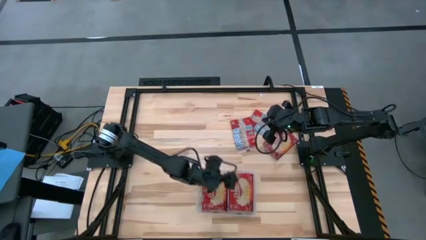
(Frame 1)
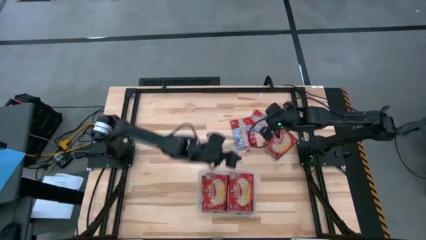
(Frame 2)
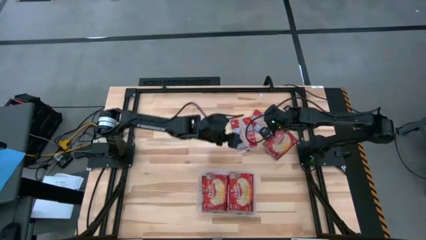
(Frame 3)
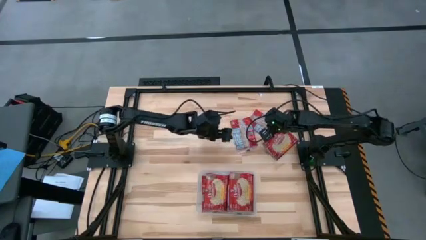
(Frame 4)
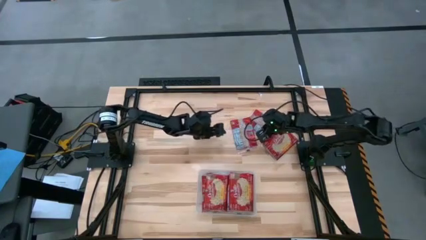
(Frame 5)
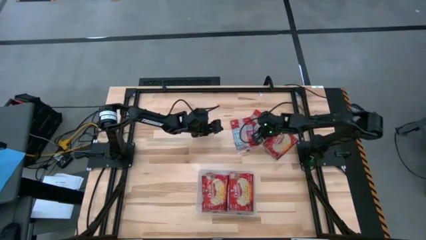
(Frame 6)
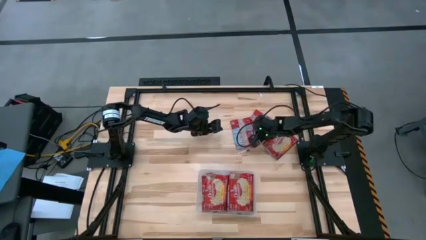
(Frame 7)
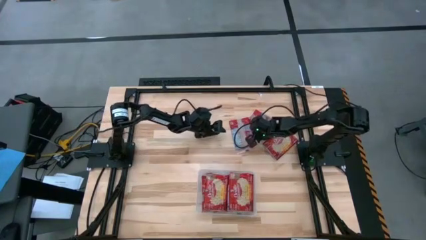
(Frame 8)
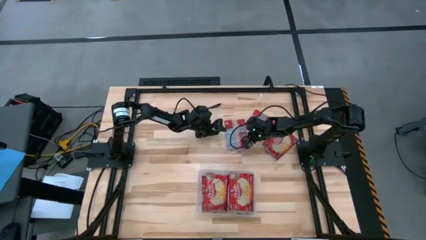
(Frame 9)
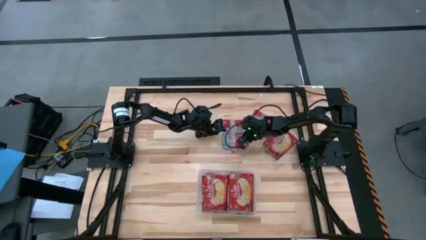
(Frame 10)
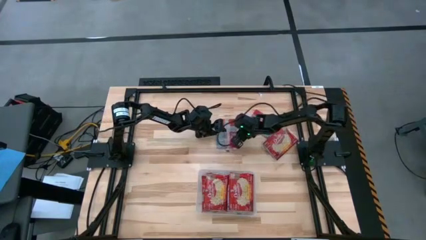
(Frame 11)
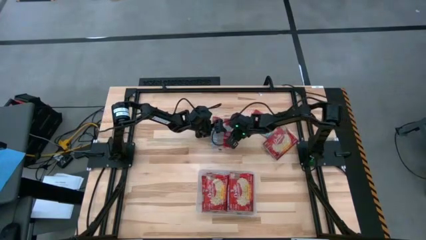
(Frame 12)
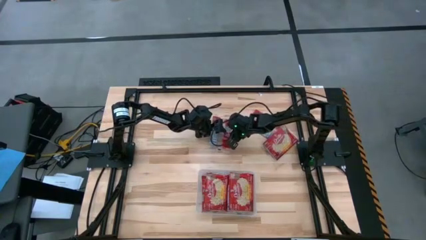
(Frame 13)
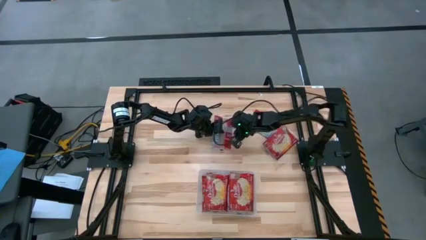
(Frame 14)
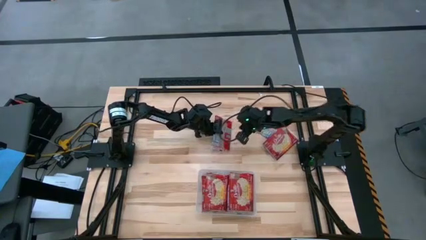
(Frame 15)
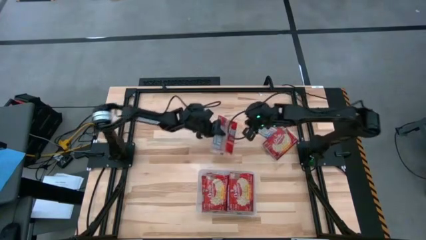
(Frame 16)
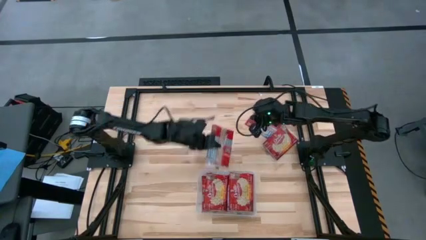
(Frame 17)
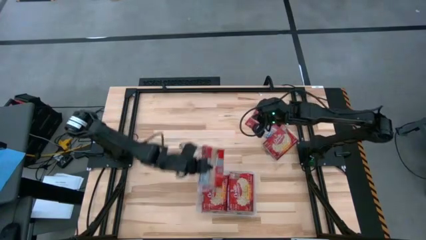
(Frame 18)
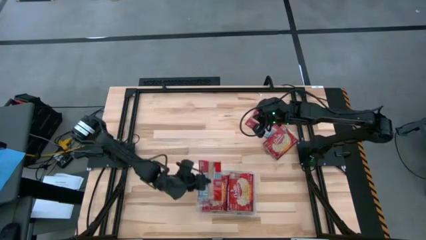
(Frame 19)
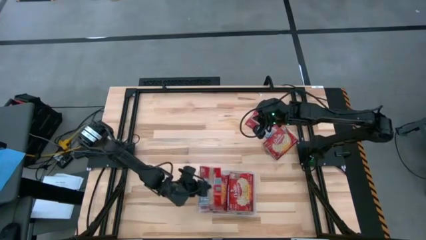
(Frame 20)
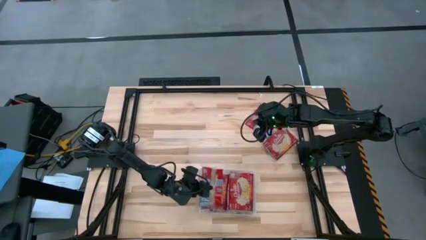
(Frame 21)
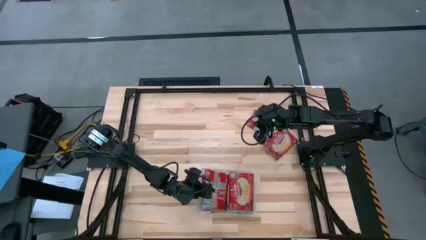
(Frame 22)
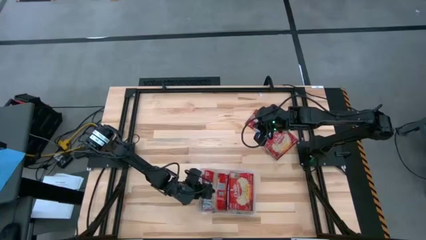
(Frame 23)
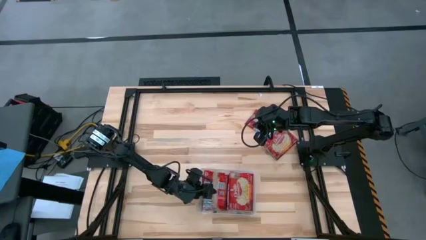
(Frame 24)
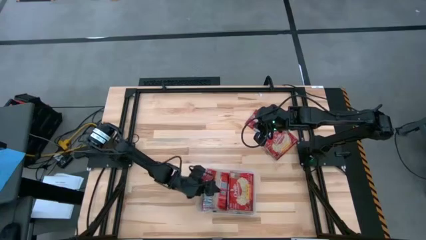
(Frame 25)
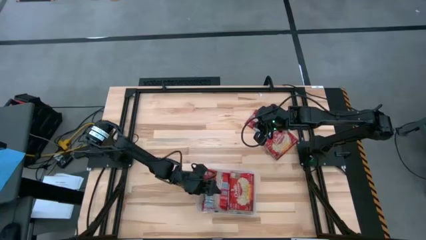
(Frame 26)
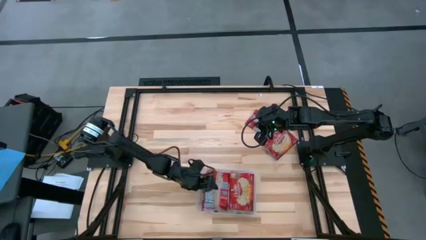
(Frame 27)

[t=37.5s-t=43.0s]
Task: Sort popcorn bags into baskets
Put the red popcorn bag into the white bin

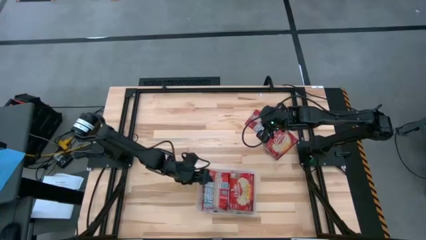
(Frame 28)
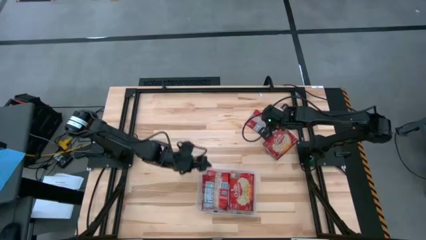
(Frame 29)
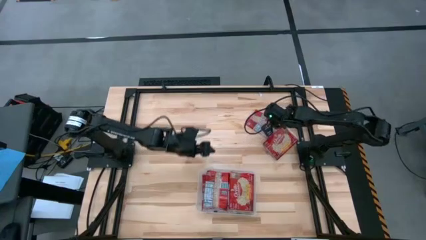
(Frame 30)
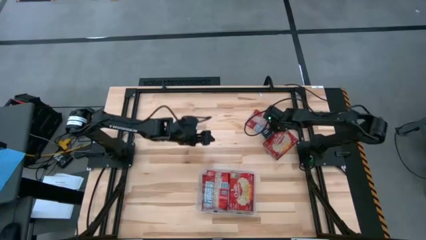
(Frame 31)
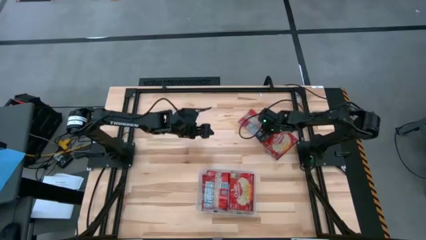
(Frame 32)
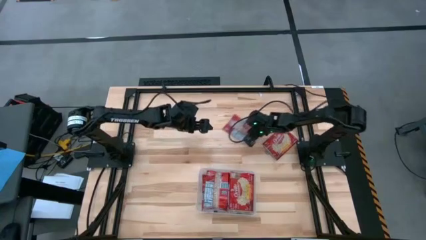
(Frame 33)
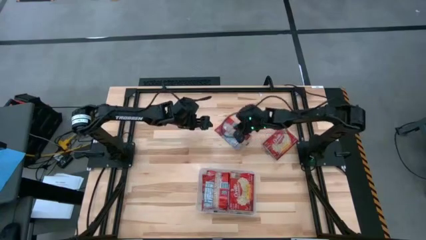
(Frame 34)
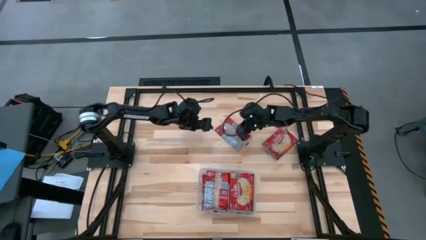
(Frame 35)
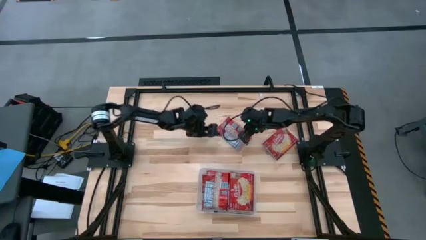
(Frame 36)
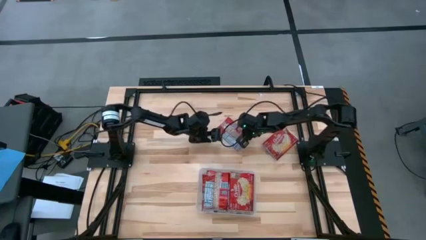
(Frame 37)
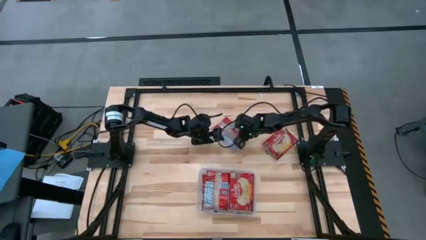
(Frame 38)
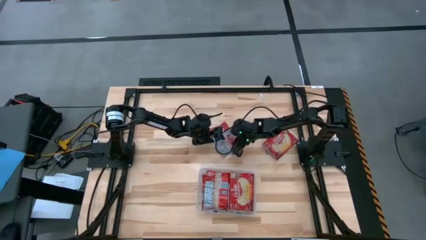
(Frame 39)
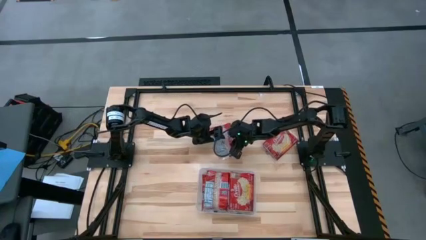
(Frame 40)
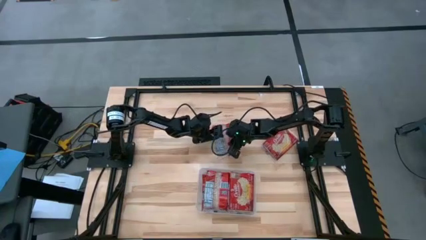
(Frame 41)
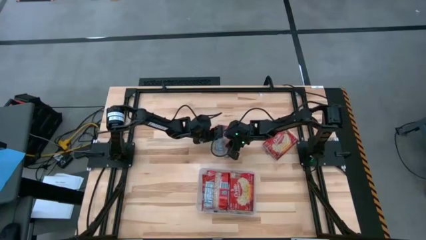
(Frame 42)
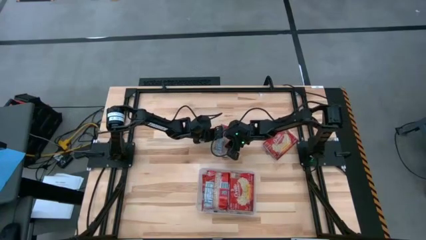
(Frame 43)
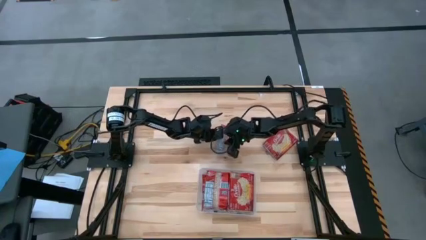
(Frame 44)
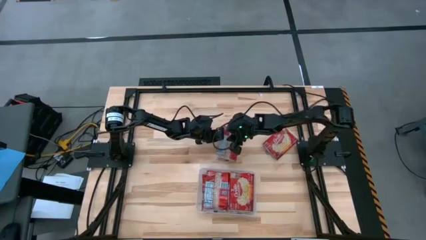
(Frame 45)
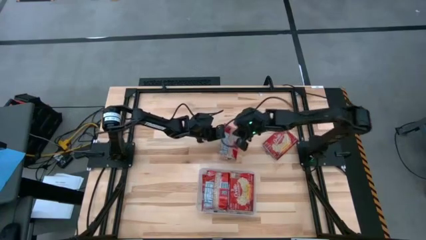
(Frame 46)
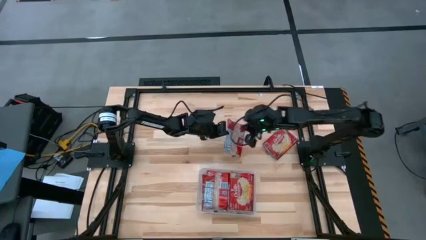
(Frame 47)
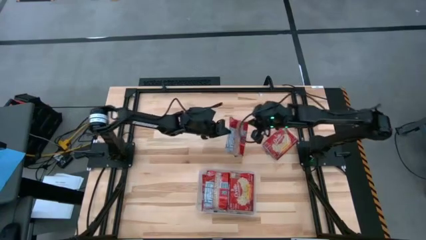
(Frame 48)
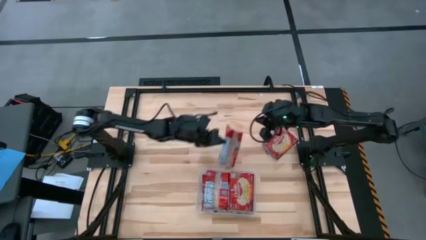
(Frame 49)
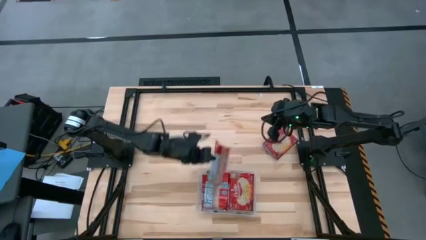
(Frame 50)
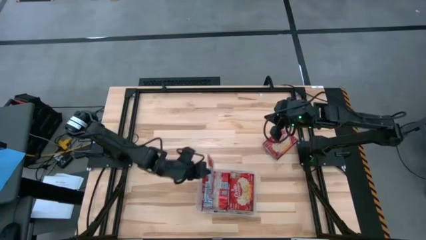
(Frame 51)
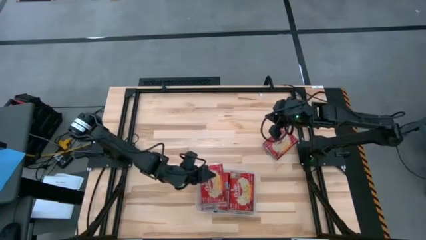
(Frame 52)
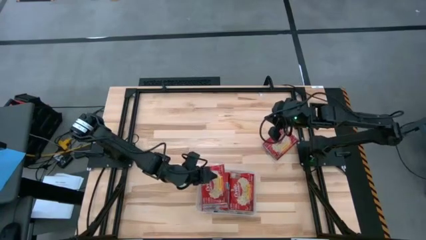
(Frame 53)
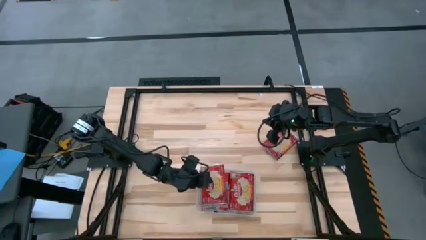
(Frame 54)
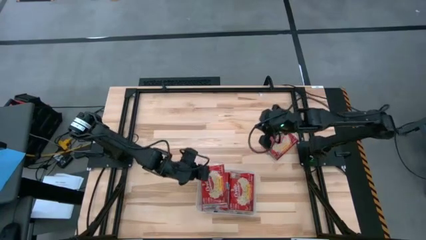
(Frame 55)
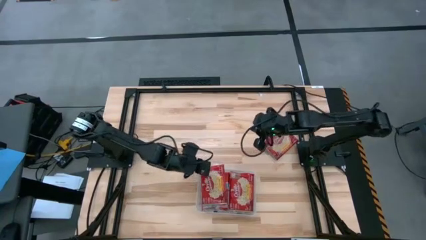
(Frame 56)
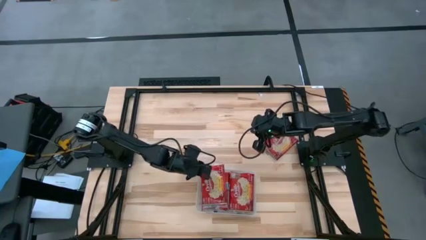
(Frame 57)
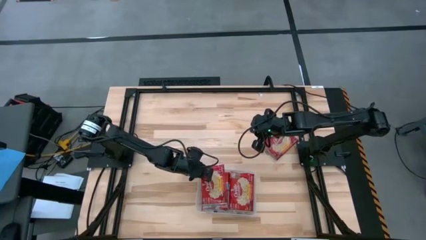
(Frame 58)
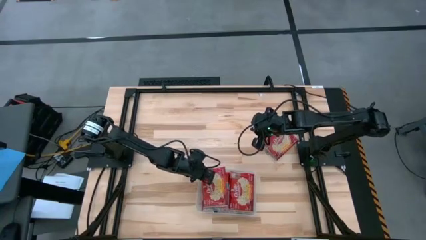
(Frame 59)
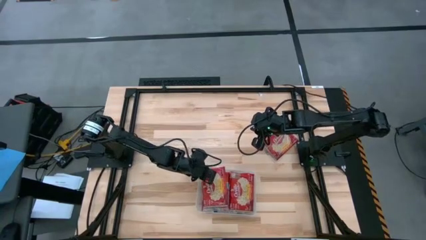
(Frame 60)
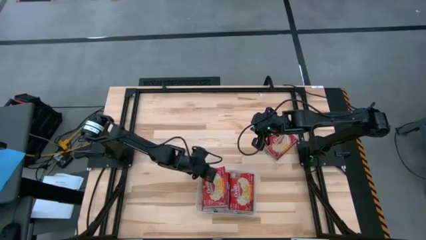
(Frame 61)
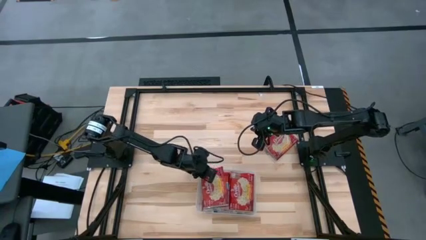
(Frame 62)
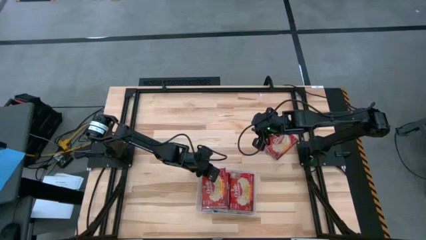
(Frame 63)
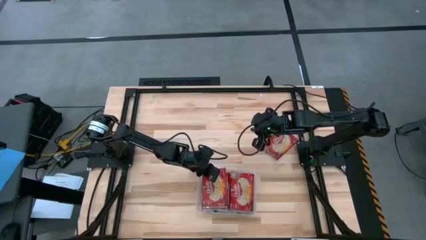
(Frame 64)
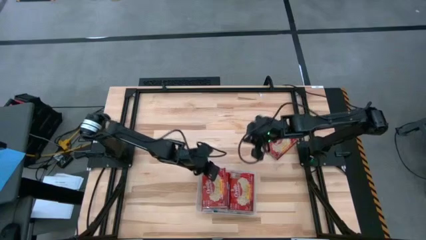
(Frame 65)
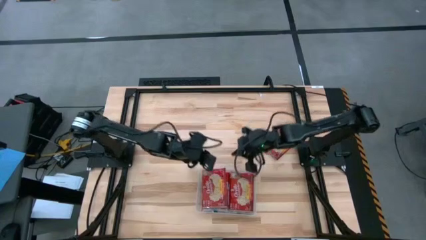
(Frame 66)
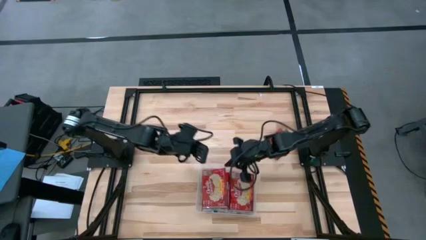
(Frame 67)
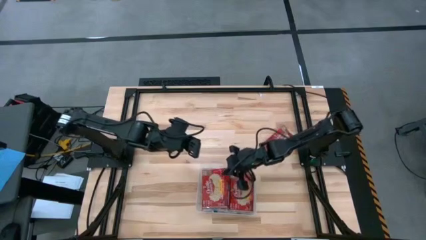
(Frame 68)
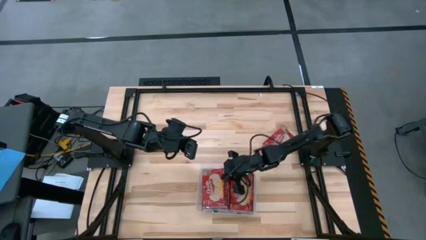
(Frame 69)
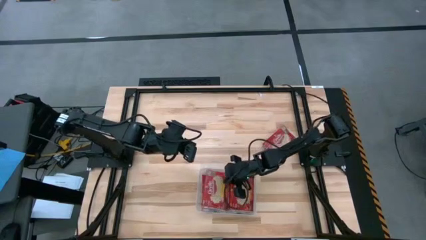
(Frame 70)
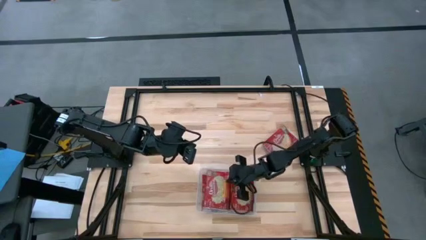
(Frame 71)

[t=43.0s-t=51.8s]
Put the red popcorn bag into the white bin

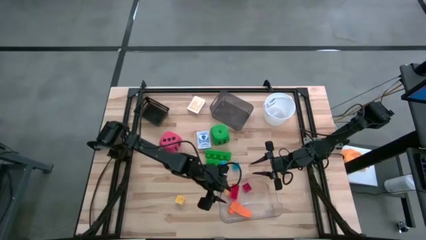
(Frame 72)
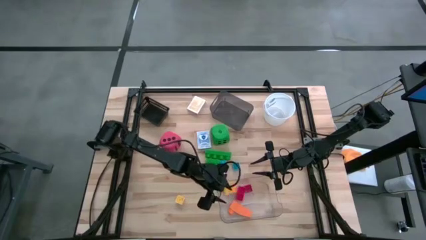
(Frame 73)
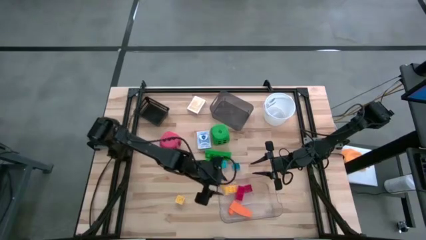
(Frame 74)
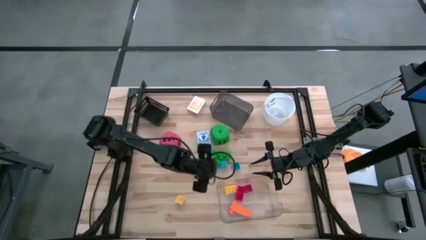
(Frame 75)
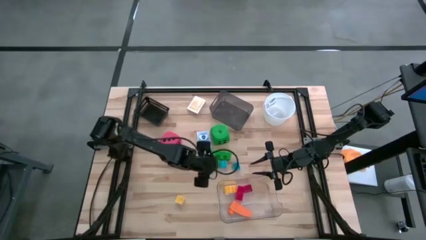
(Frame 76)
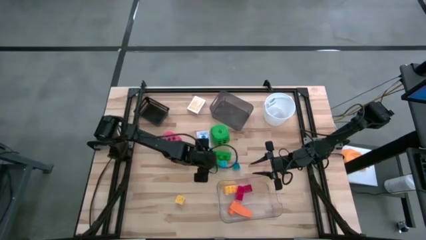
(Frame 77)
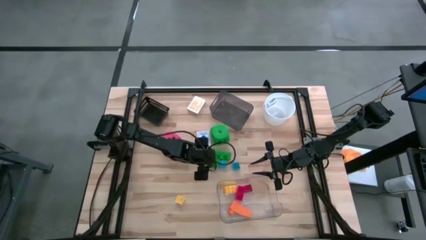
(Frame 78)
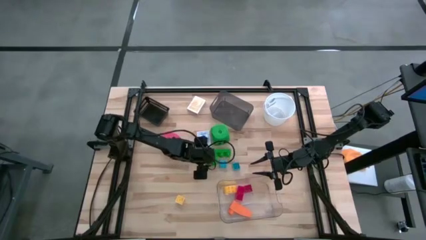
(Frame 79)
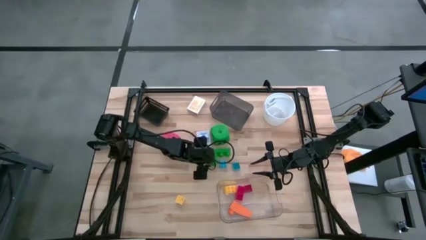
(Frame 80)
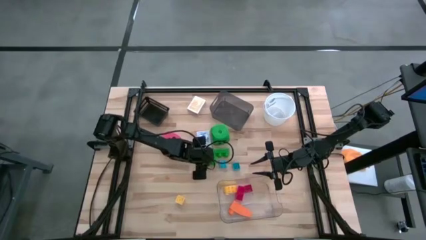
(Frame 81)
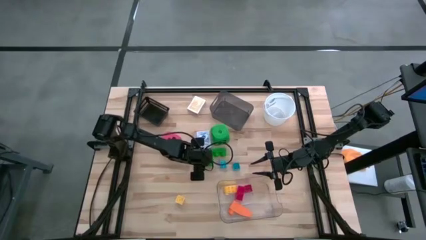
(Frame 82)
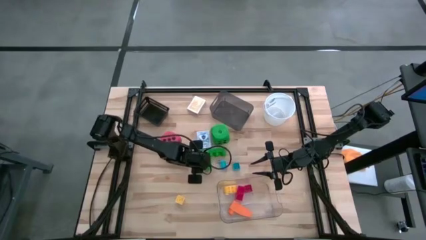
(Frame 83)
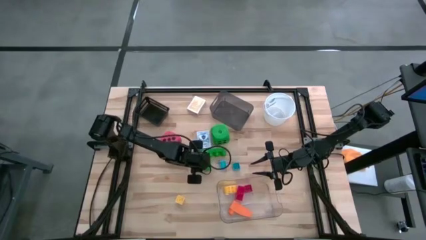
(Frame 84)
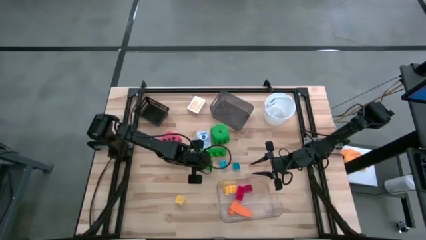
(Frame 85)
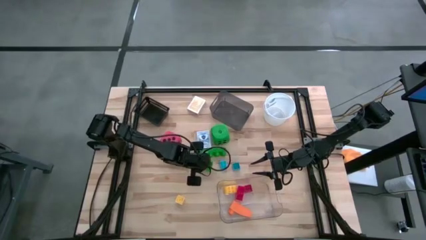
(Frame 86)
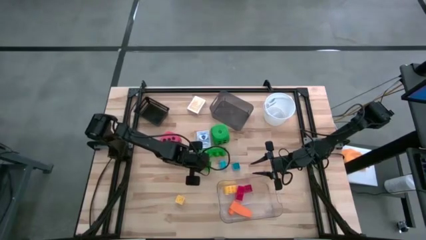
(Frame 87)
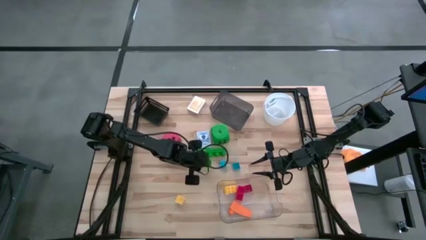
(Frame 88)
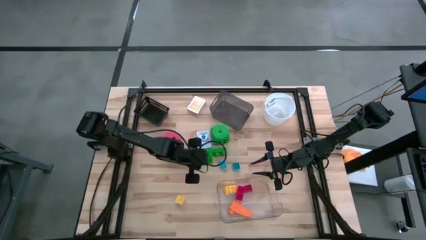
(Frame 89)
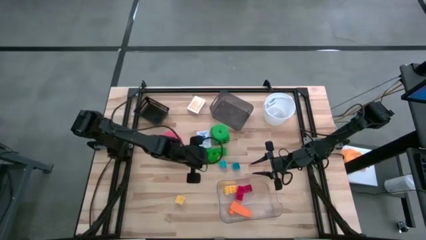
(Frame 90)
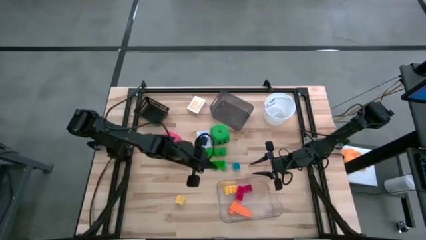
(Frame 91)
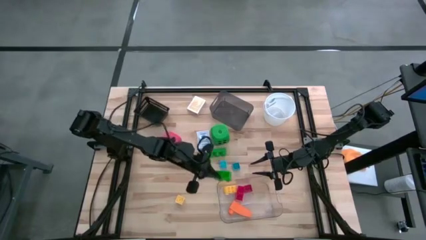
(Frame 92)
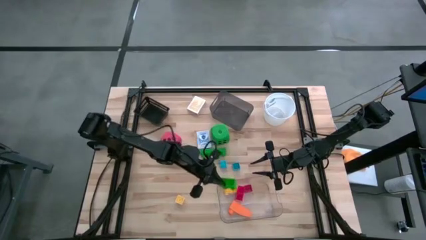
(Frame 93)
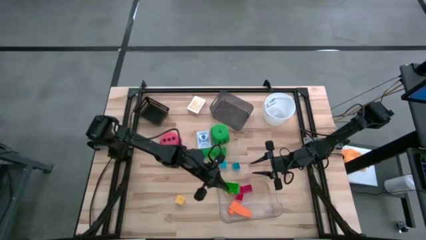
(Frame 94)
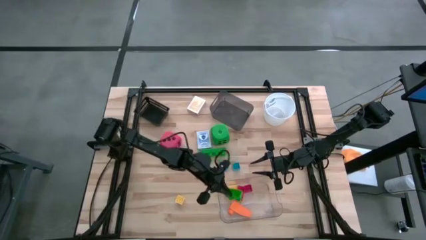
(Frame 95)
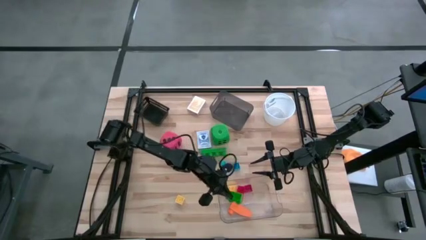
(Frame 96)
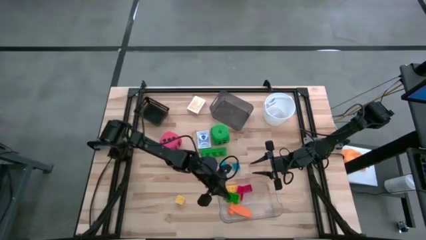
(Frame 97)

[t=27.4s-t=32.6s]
Task: Pick & Place Toys
Put the bottom green game piece into the transparent bin
